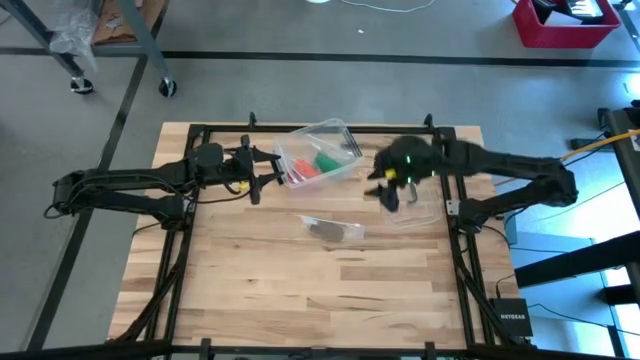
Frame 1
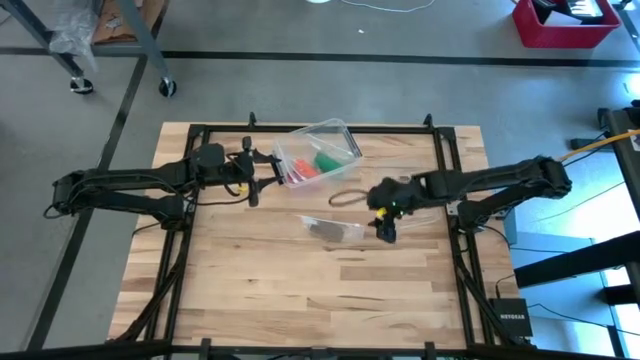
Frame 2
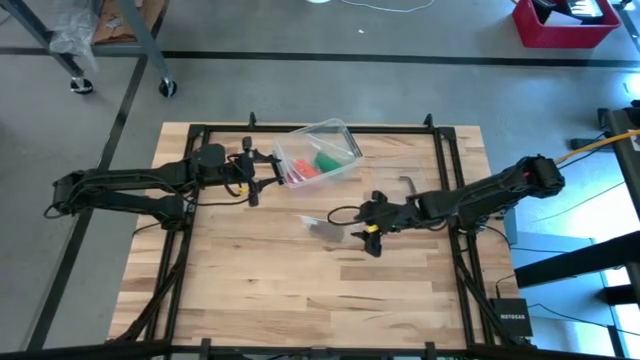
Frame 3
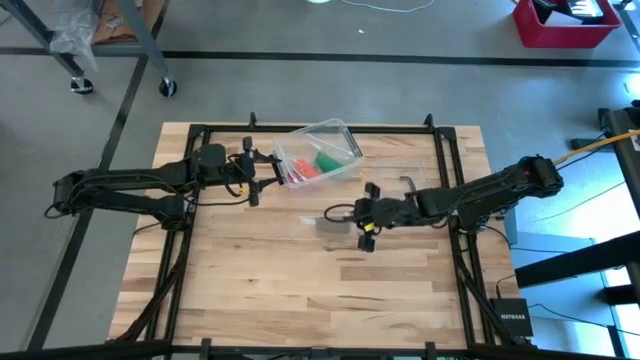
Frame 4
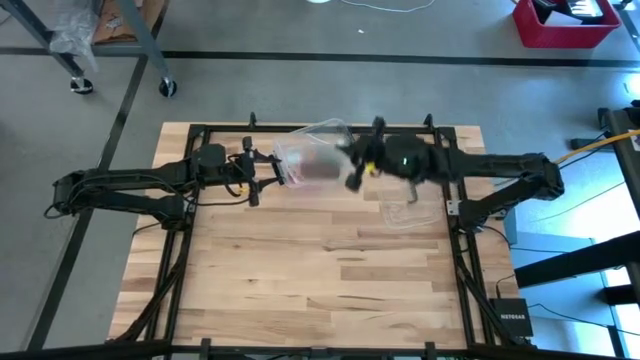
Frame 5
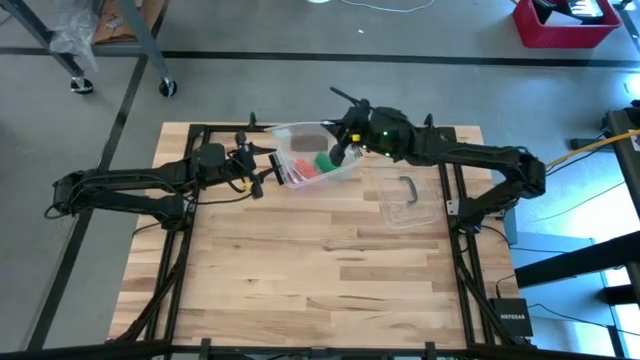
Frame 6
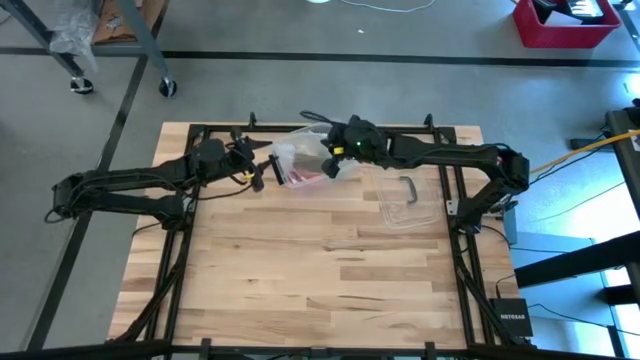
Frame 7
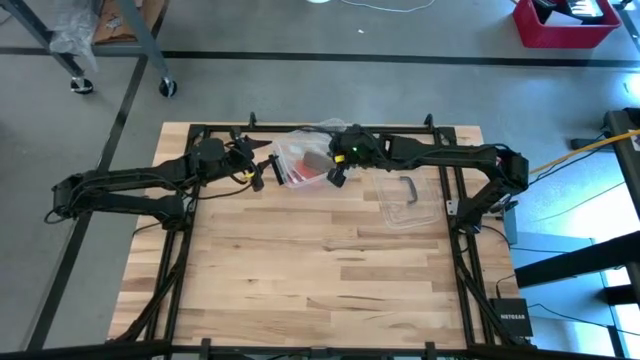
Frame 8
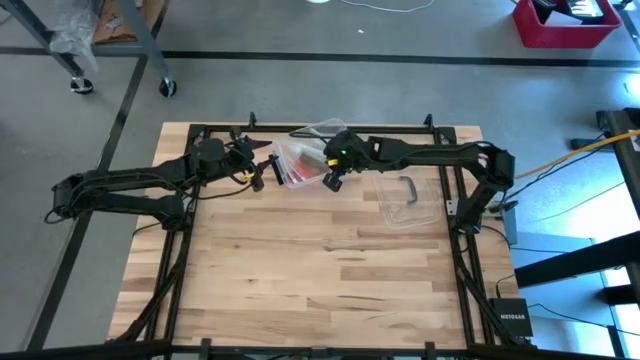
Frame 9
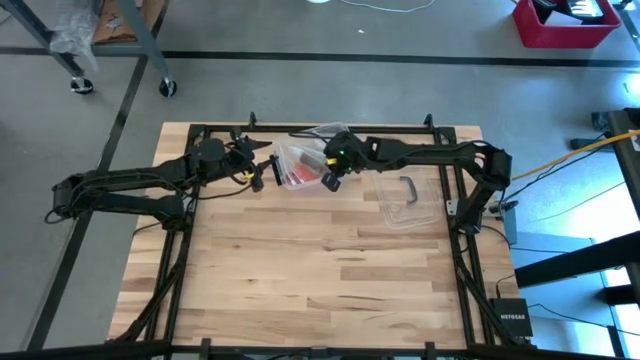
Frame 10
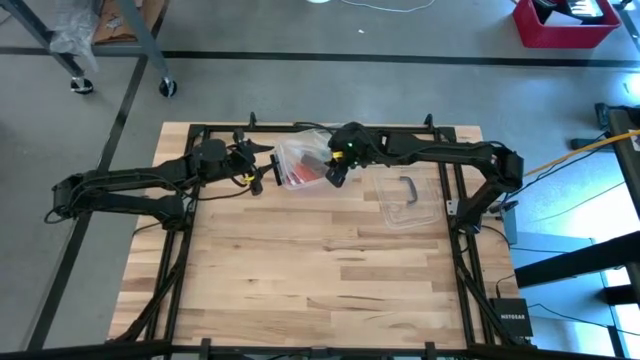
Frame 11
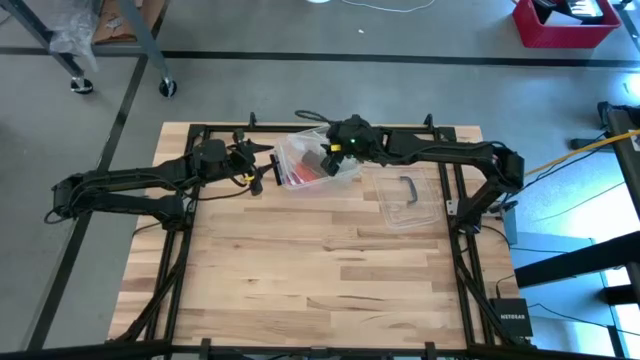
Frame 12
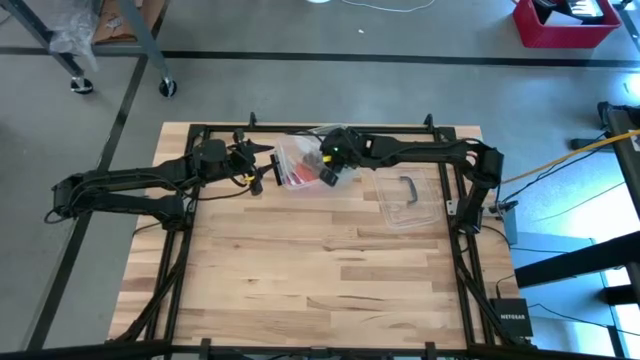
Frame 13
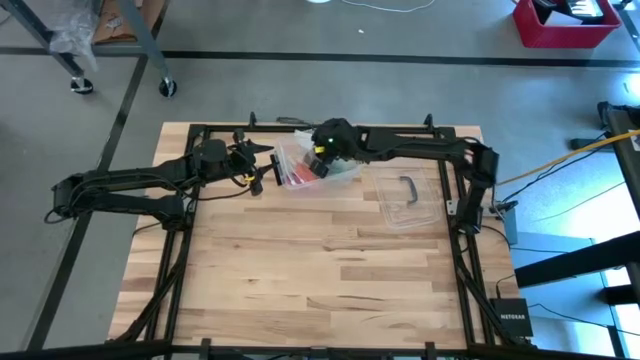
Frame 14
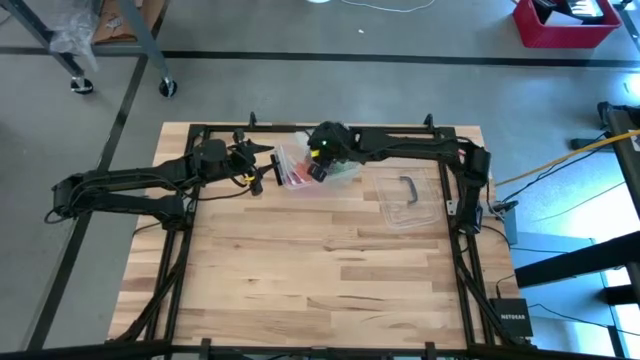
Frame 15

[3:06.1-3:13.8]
Task: Roll bandage
Put the transparent zip bag into the transparent bin

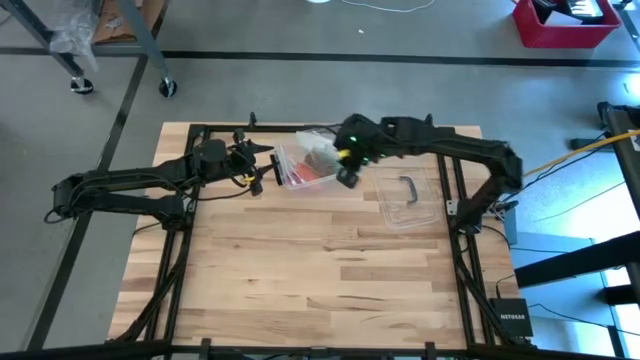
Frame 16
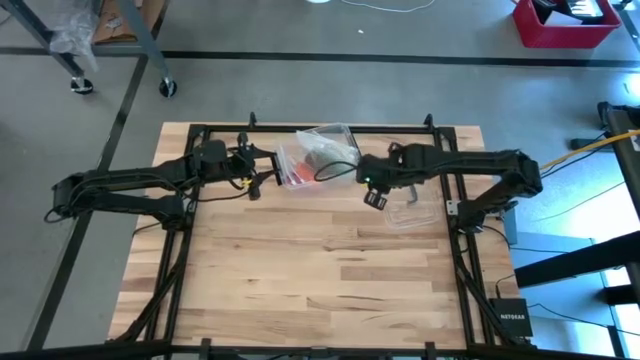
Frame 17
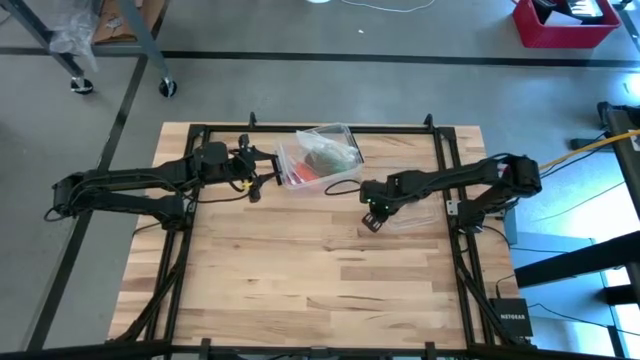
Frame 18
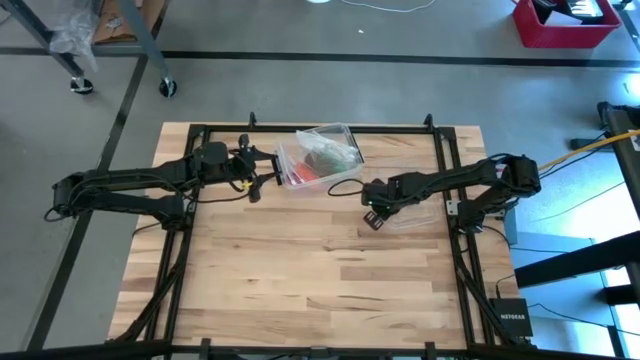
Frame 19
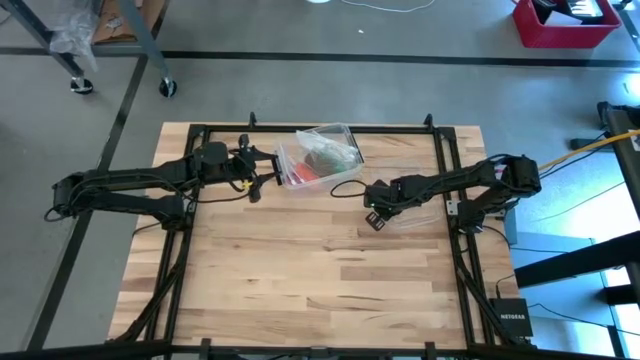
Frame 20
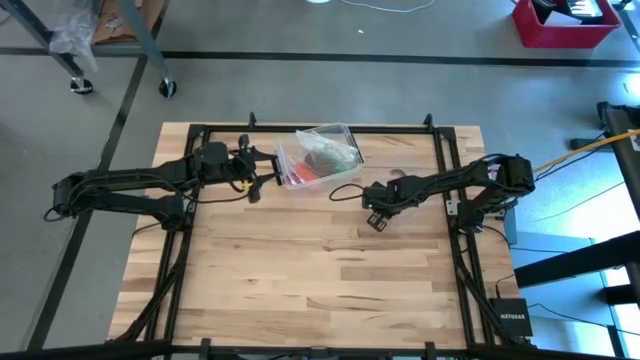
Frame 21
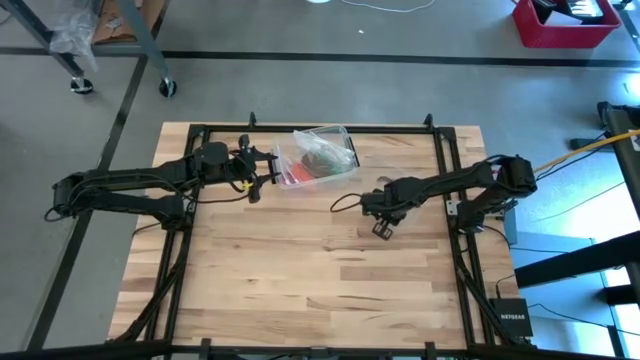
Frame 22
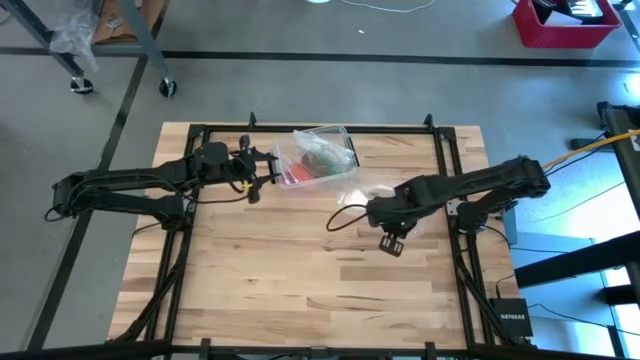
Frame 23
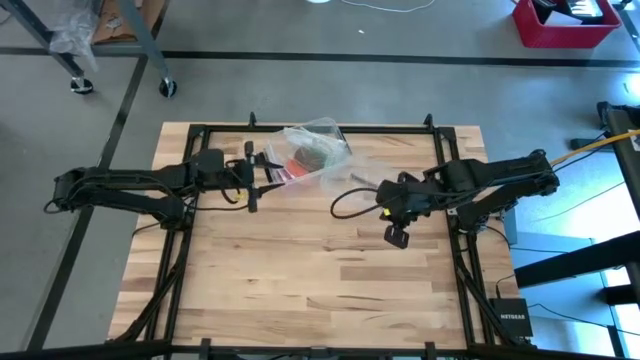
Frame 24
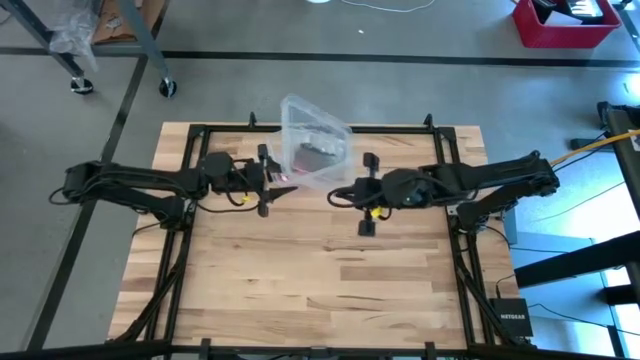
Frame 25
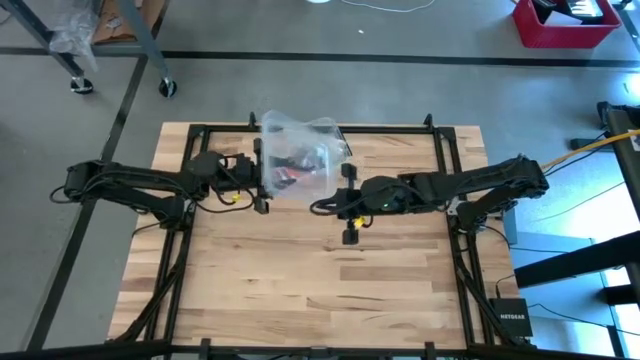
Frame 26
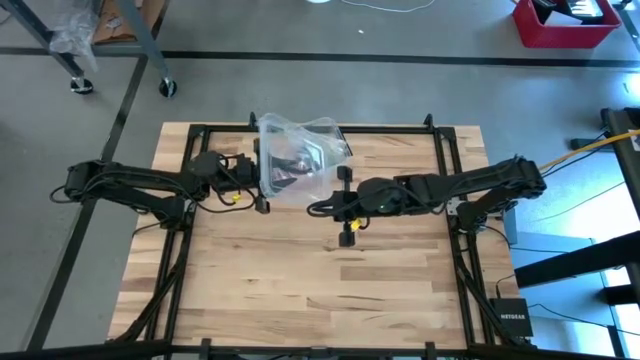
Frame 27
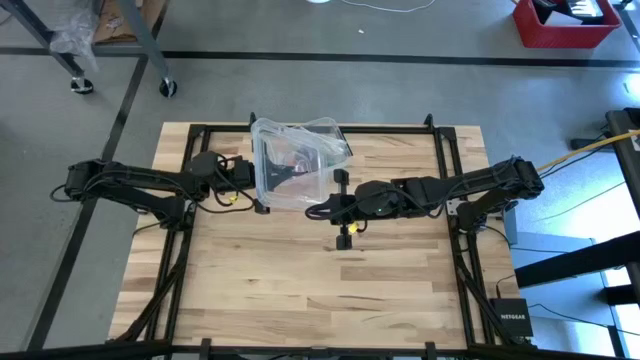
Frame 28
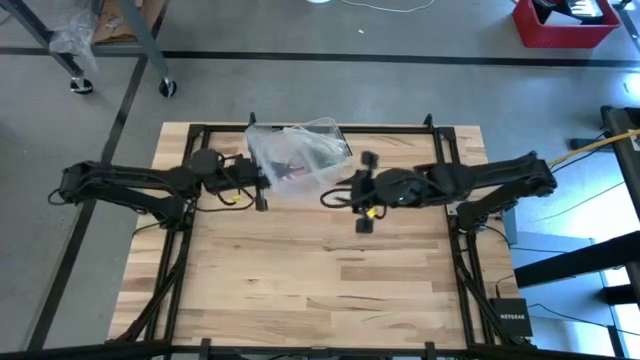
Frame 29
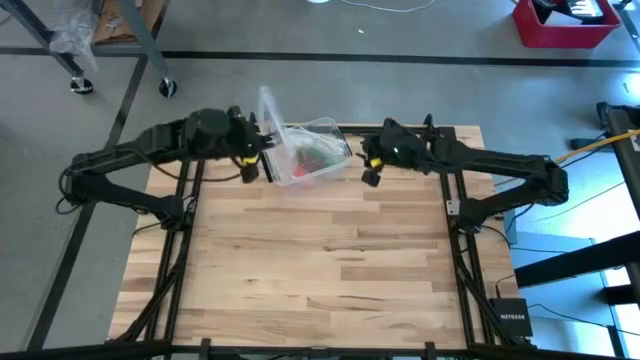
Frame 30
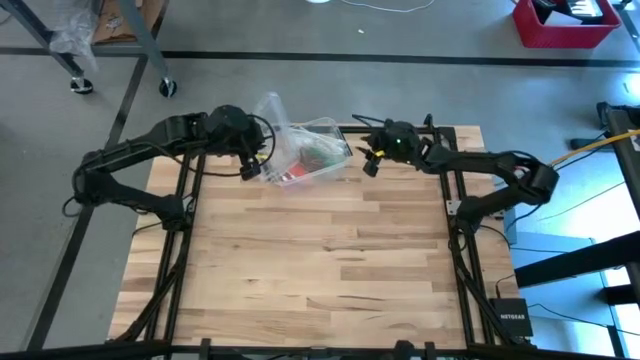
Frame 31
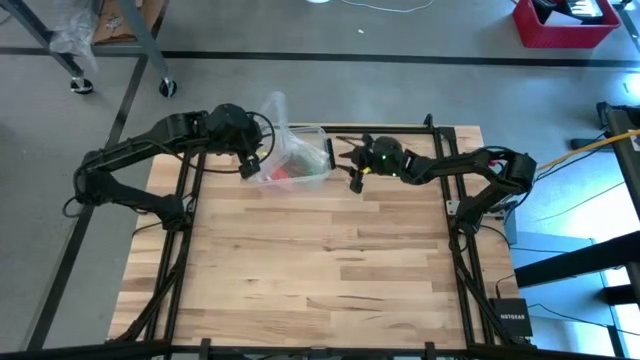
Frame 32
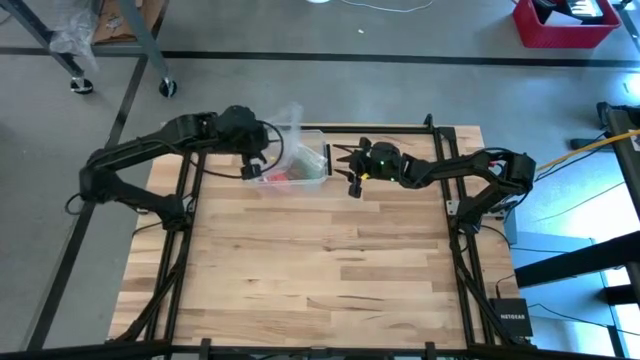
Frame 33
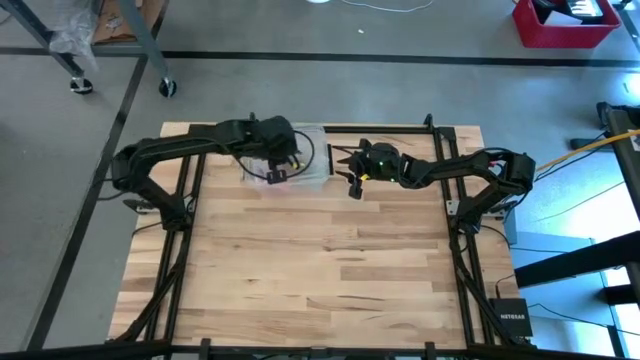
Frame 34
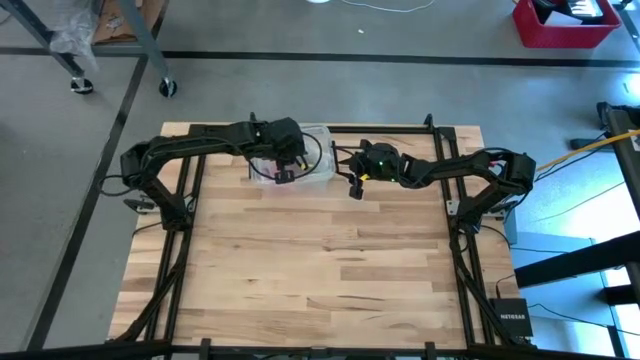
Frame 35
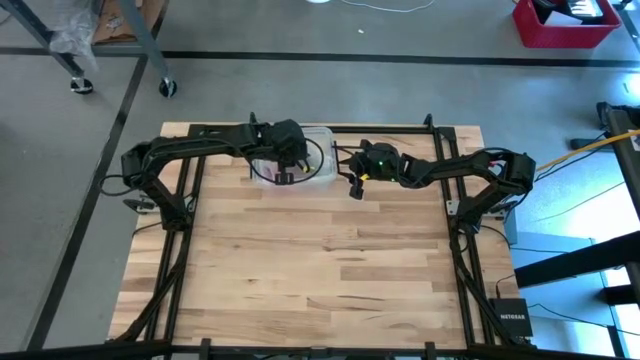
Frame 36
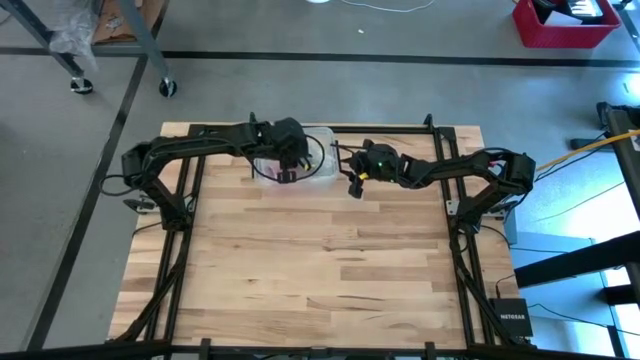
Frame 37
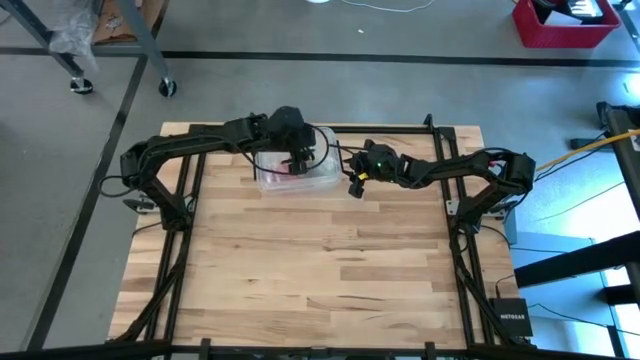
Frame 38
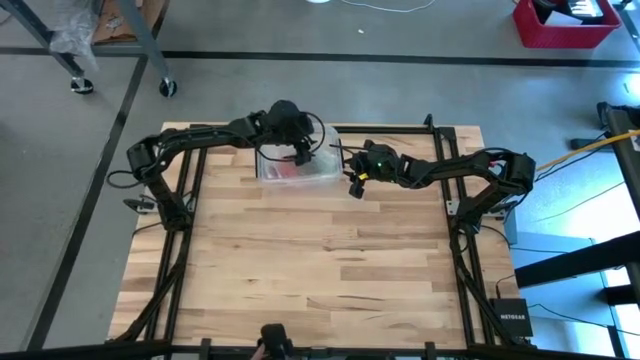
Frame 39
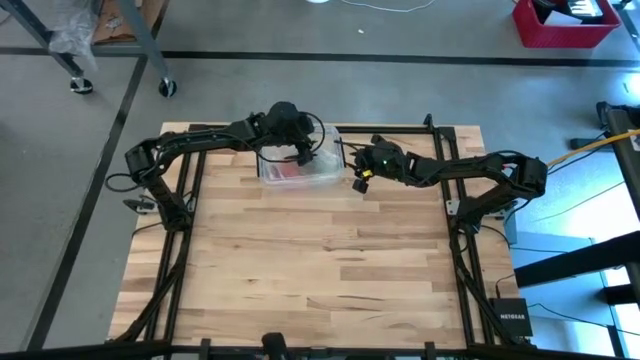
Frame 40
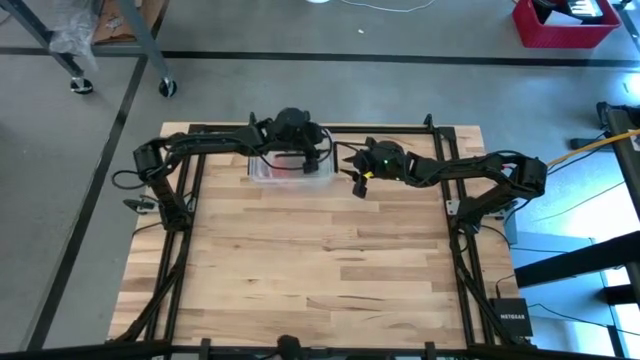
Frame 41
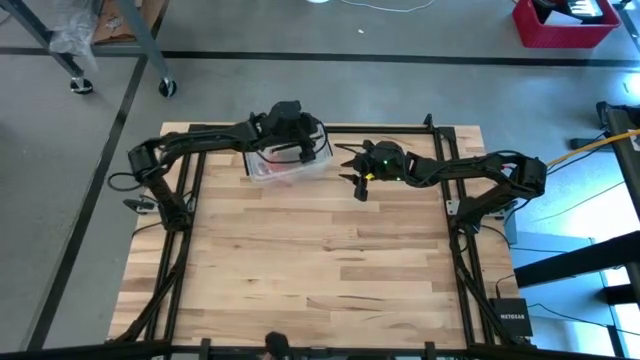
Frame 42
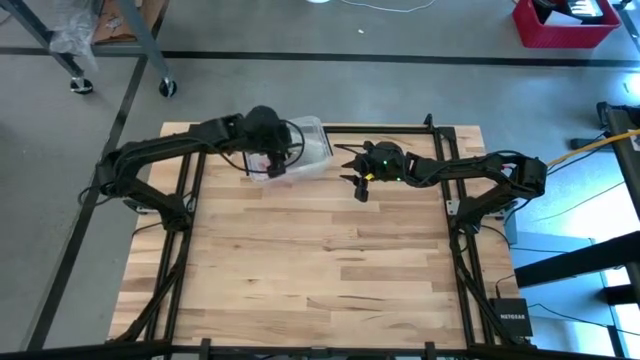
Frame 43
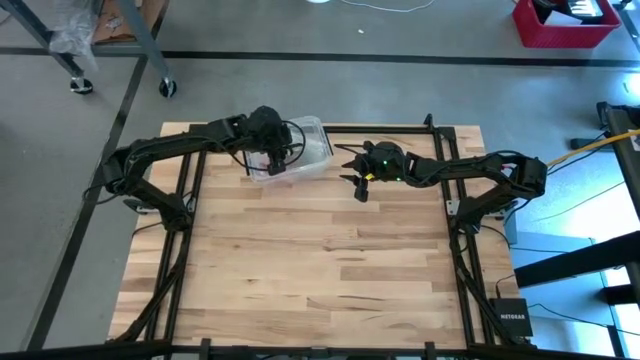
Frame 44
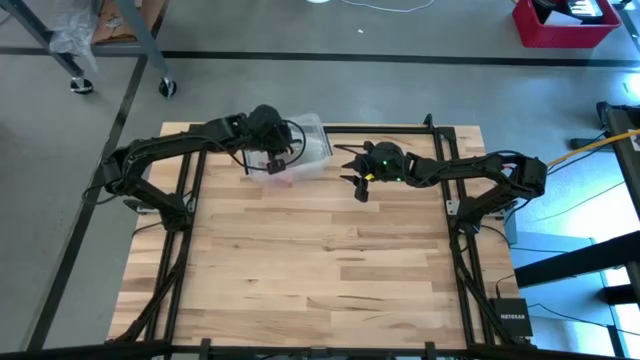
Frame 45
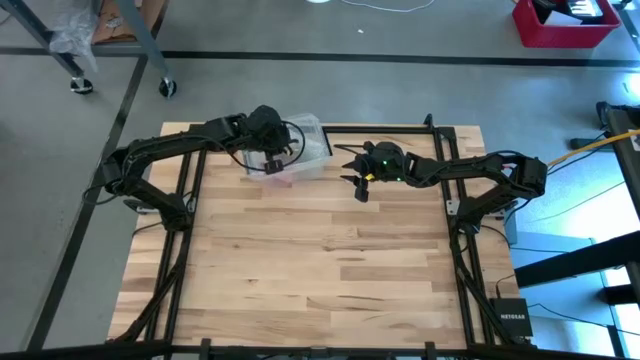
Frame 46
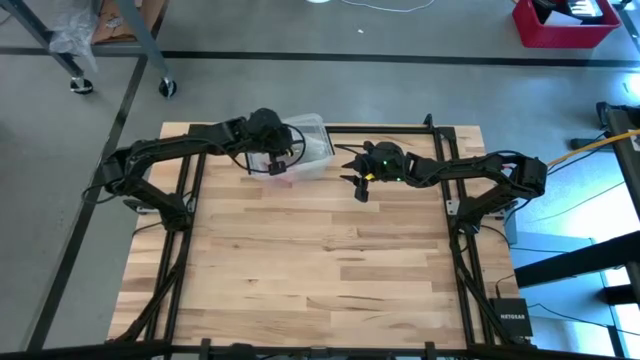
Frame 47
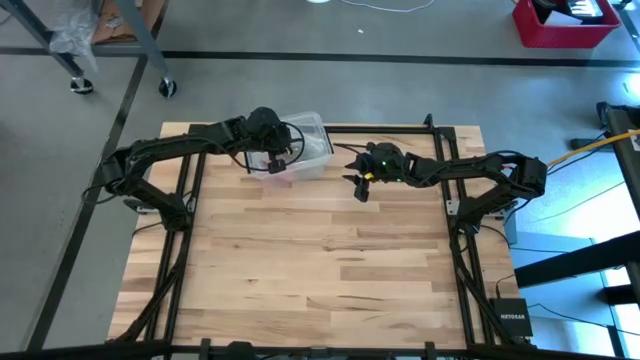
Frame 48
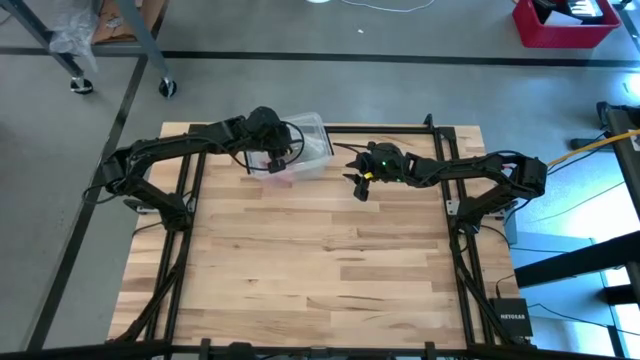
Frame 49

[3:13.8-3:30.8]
Close the transparent bin
